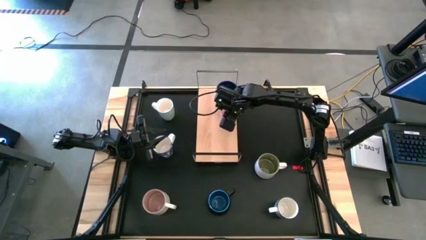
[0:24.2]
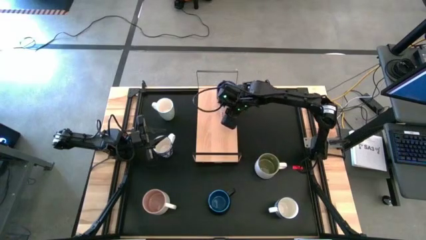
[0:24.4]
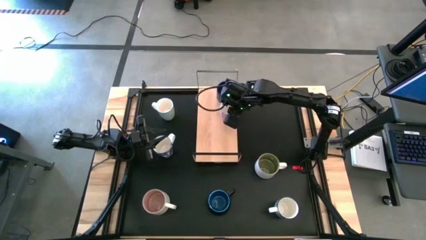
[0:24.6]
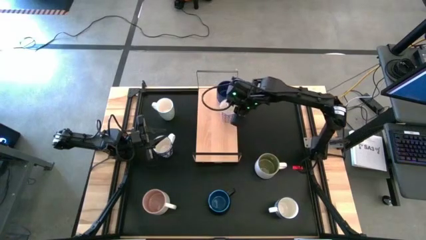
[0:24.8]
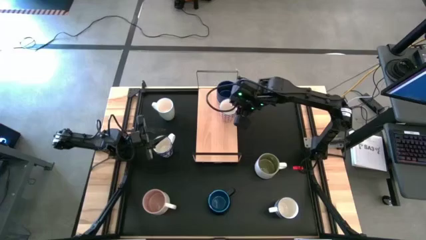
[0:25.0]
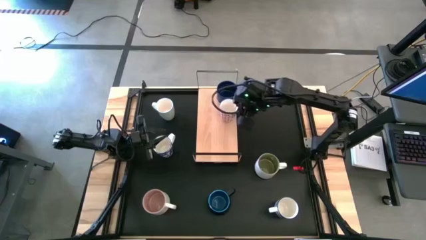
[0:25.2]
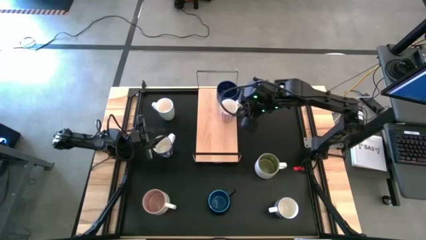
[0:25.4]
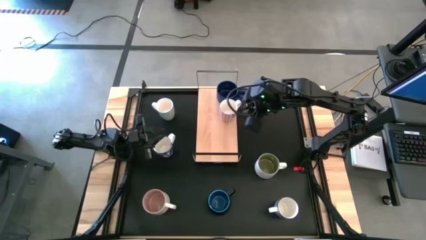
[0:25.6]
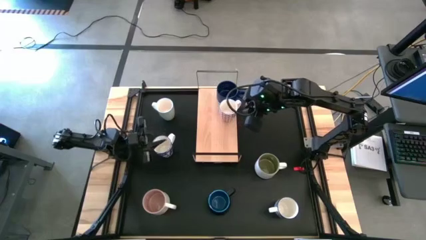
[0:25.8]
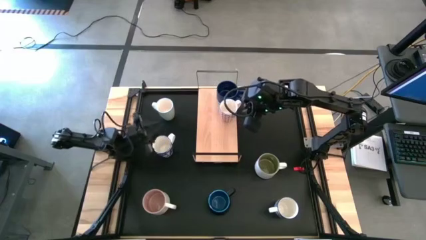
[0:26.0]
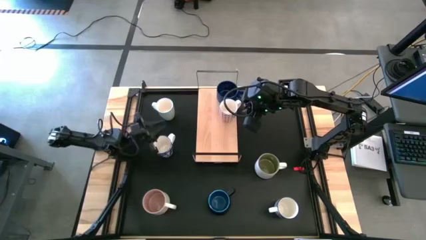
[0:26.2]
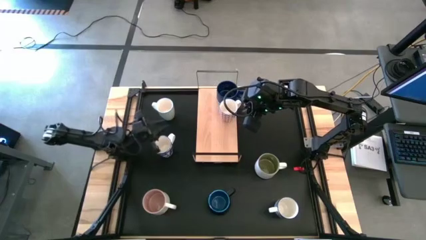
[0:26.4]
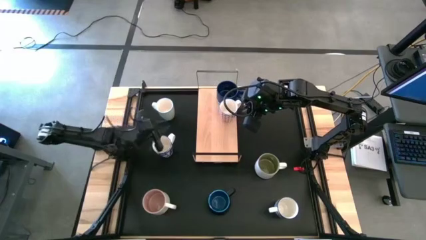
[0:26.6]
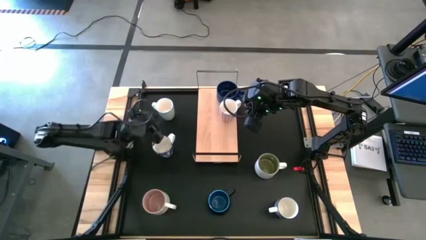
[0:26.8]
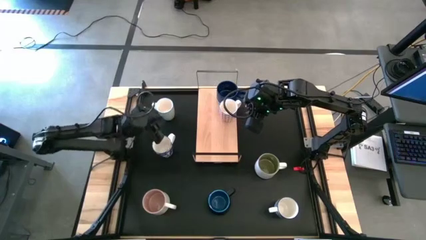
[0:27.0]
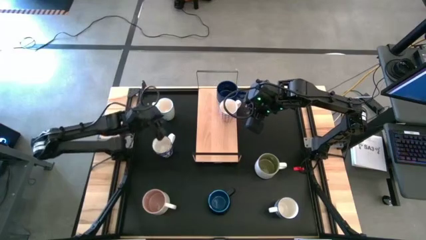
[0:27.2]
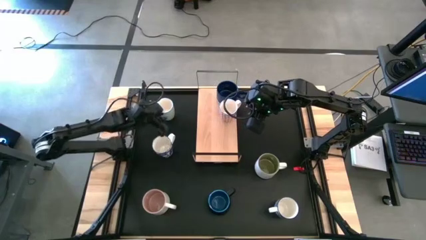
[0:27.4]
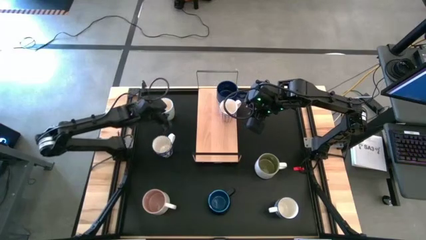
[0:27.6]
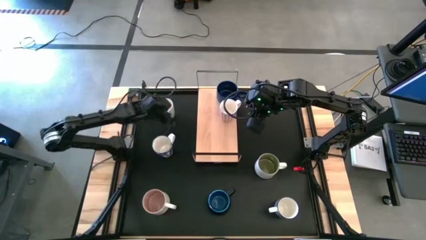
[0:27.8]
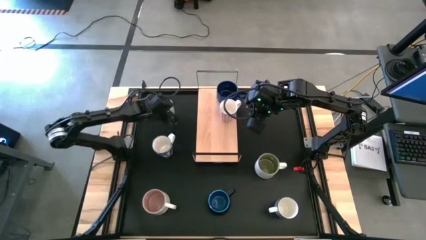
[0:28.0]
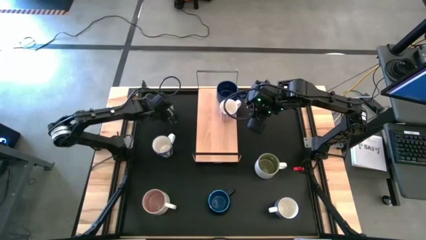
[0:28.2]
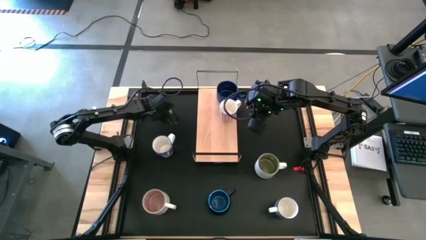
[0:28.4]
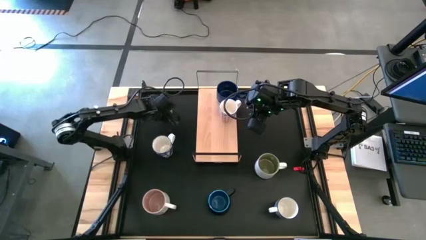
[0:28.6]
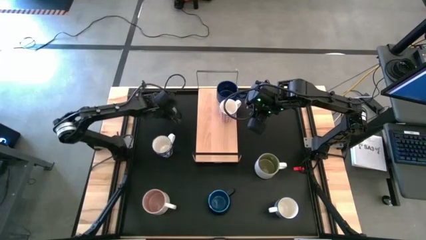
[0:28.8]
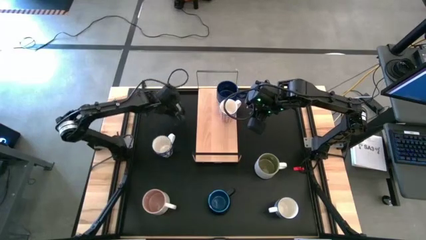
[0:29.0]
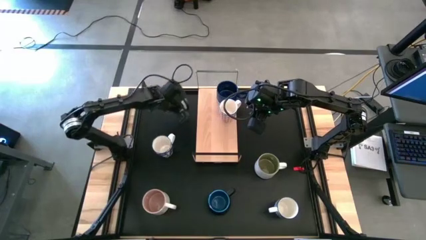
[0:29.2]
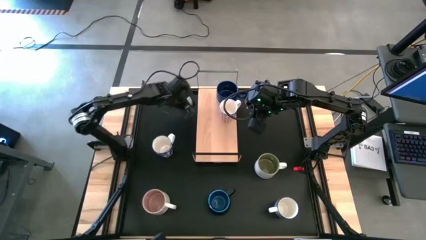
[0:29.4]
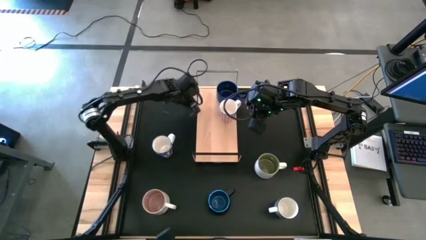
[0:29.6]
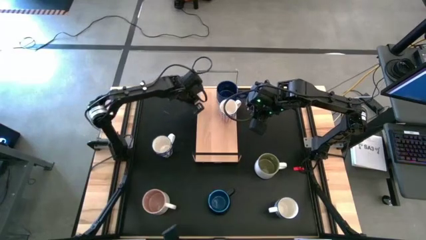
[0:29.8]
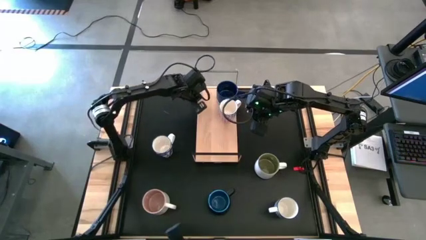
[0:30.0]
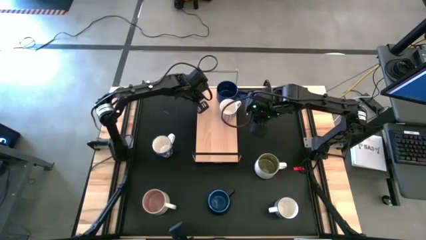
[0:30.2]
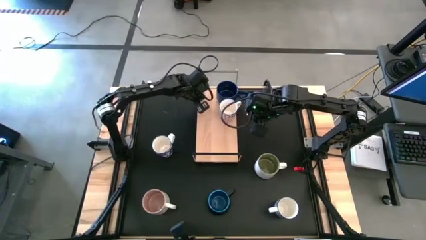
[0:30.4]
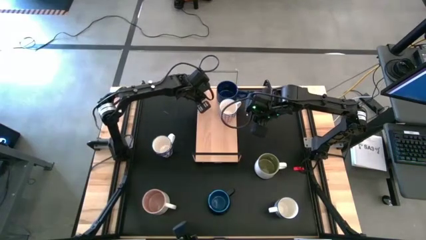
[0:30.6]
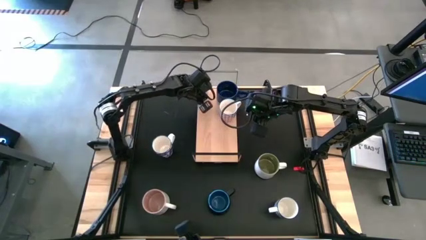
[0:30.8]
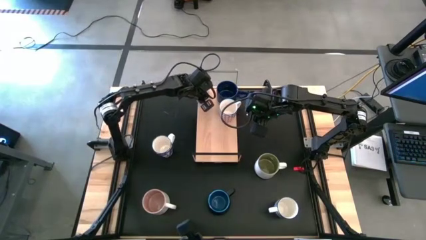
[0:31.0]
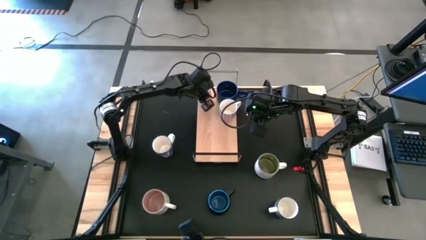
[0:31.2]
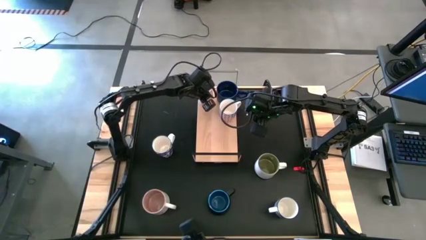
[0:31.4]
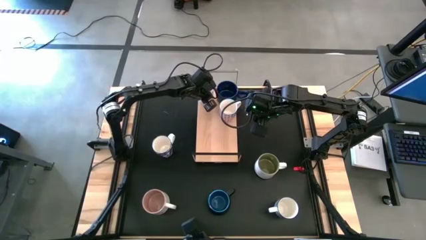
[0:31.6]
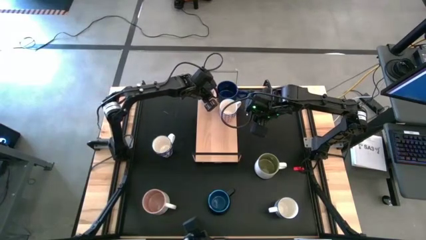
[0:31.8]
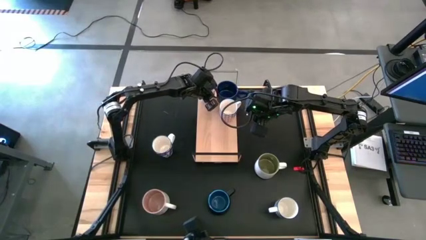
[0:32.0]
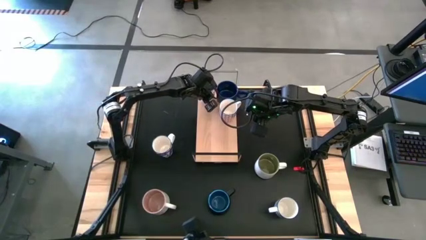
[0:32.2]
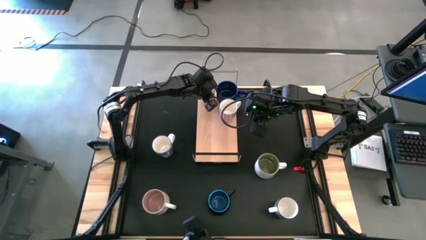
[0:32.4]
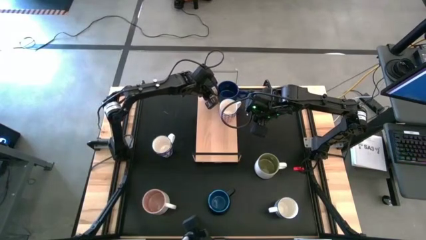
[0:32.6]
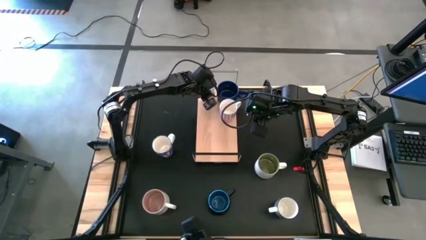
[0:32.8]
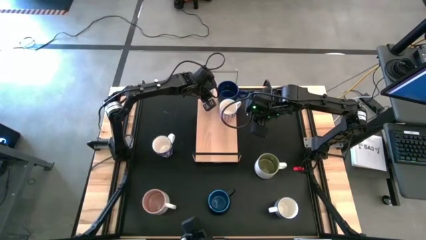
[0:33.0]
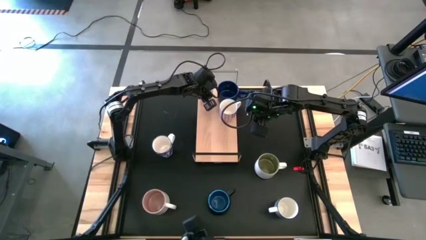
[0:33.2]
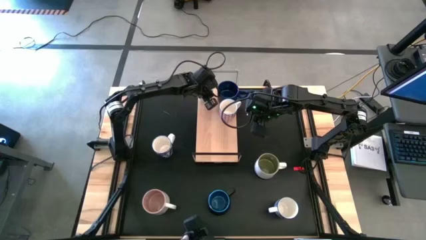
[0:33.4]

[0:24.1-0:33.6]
Task: Place coffee mugs
Put the green patterned mug on the shelf

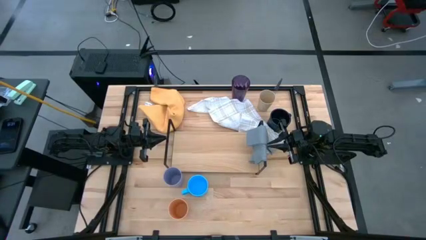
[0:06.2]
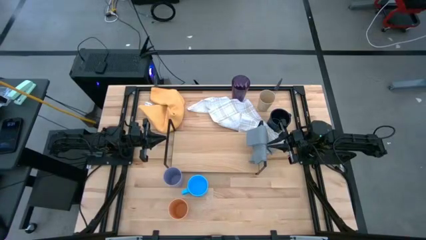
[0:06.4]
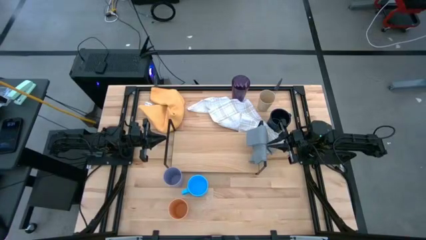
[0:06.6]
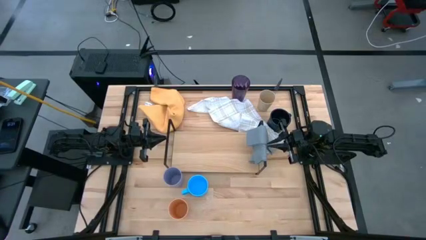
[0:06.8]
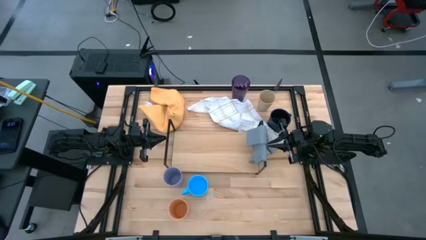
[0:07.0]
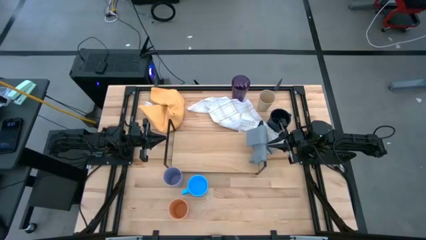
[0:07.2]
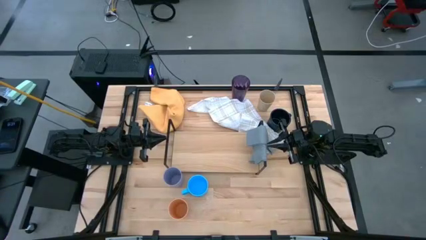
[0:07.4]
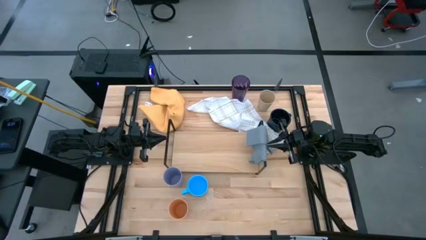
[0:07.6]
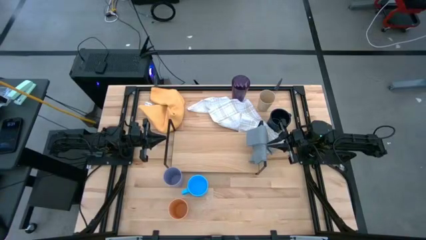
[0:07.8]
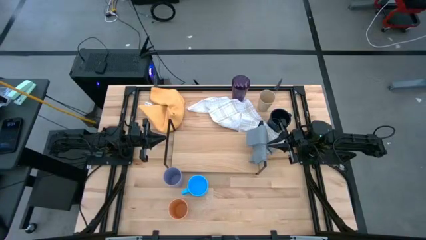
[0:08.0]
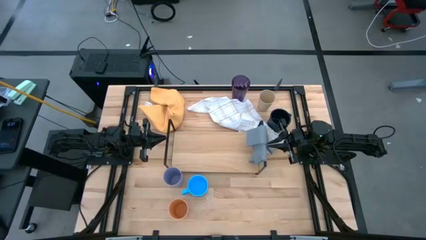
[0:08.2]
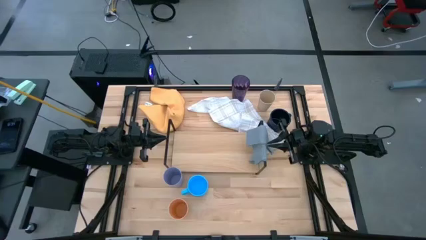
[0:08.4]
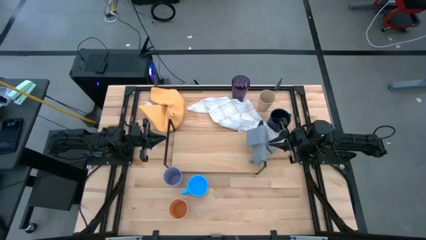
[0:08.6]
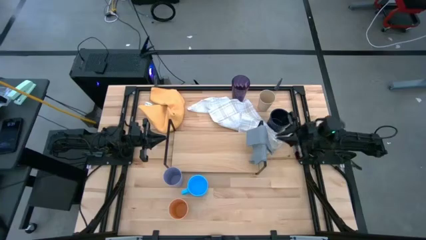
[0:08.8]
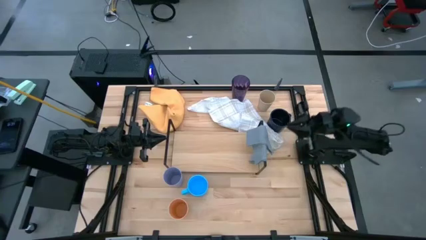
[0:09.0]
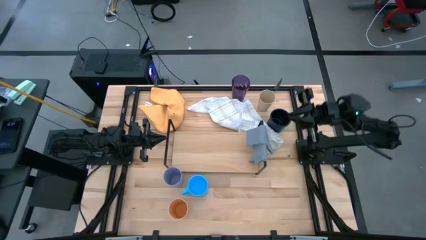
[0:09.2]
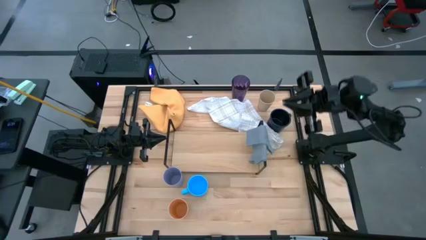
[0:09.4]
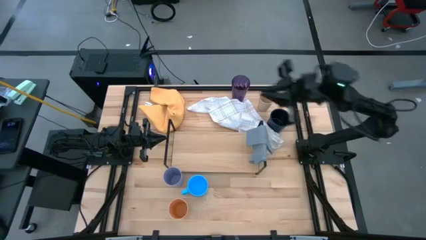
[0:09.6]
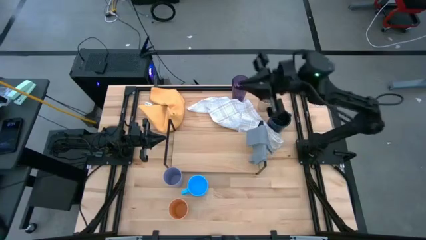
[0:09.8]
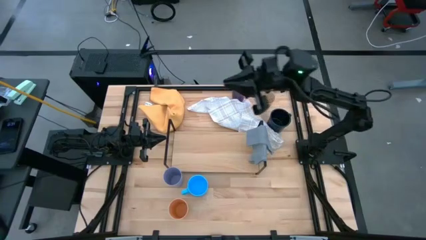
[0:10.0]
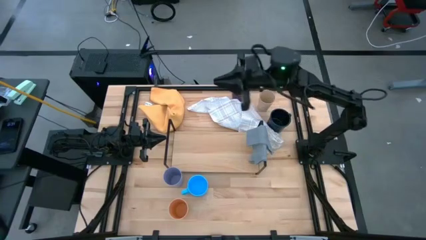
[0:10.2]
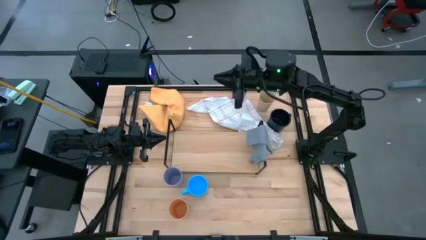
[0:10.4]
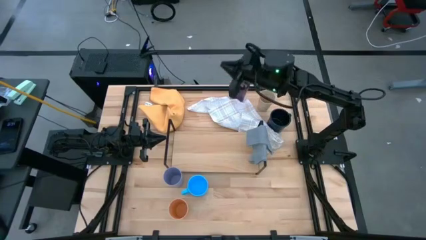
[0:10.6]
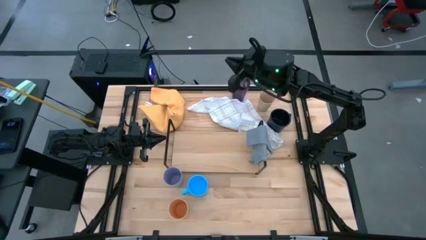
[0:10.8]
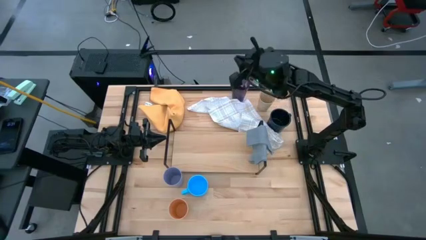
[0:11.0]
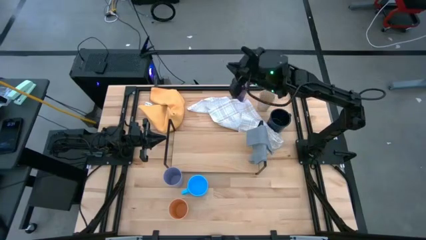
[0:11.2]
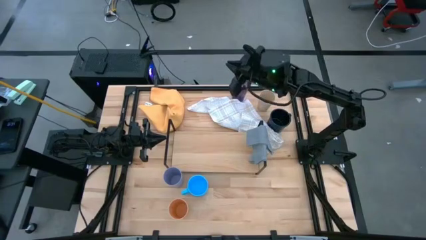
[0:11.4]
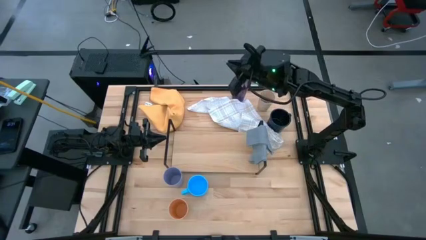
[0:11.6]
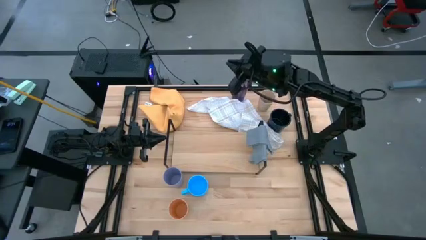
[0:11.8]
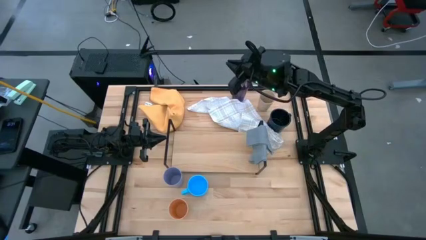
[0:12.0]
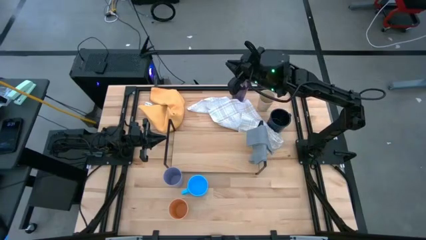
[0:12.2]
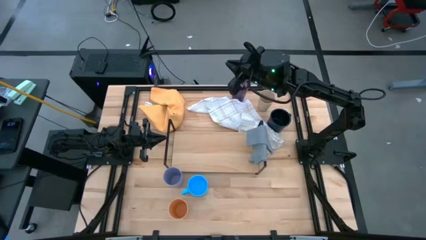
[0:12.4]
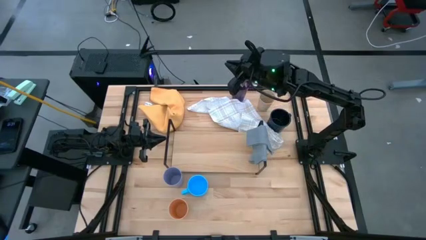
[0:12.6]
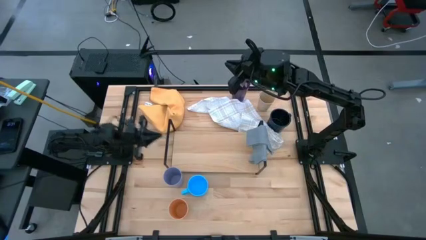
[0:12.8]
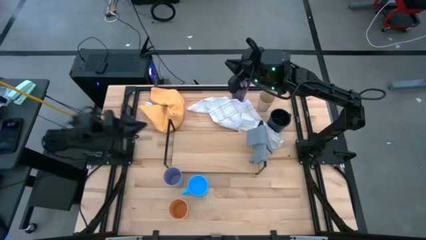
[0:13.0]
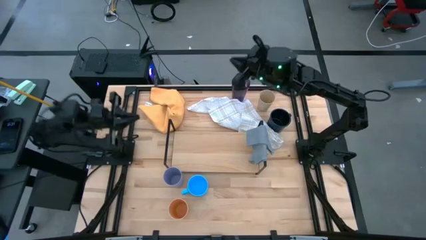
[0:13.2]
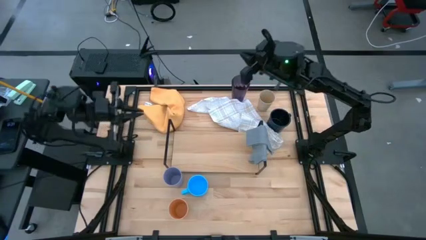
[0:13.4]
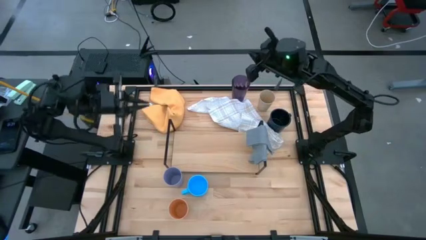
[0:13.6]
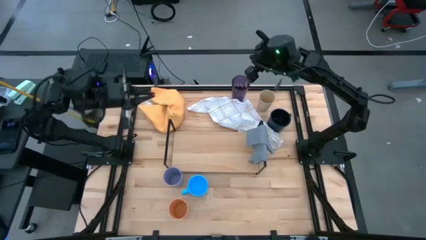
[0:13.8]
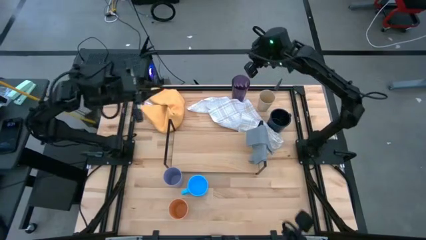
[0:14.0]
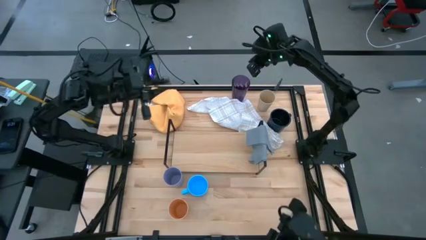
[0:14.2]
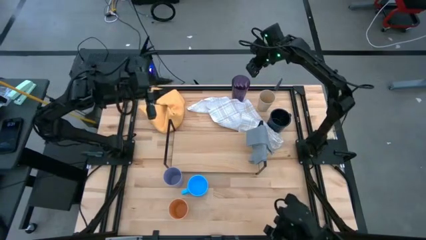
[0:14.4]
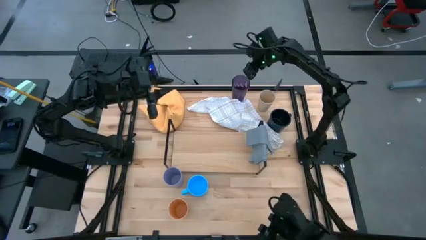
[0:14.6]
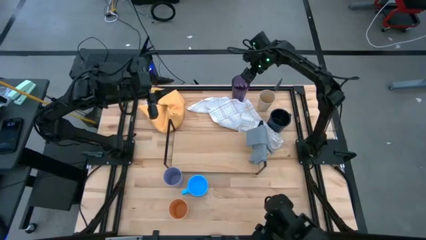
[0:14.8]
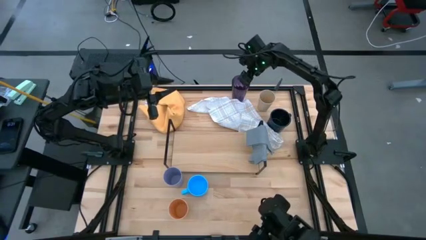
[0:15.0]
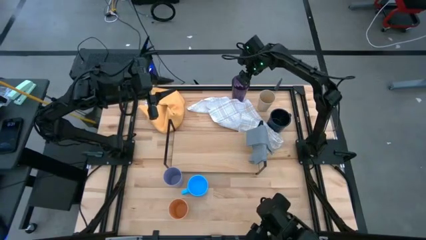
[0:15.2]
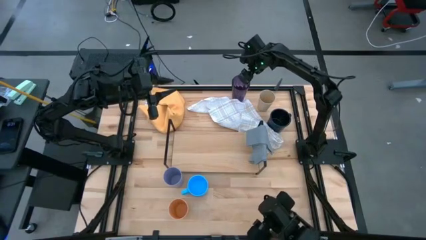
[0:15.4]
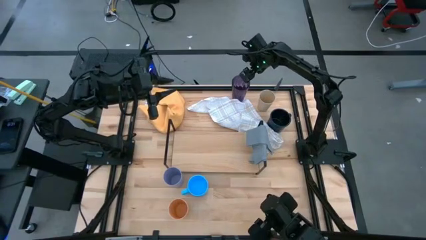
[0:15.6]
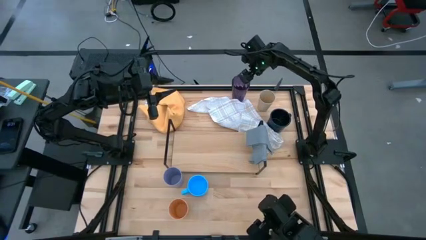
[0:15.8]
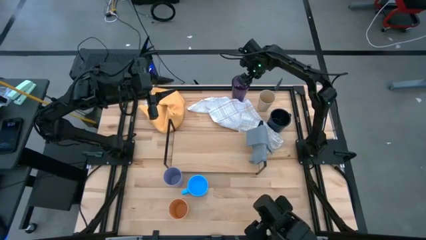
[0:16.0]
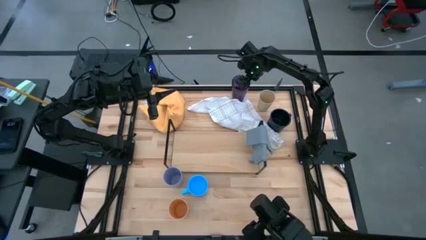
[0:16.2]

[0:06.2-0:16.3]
Task: Stack small to large cups/mugs on shelf
Put the purple cup on the shelf
